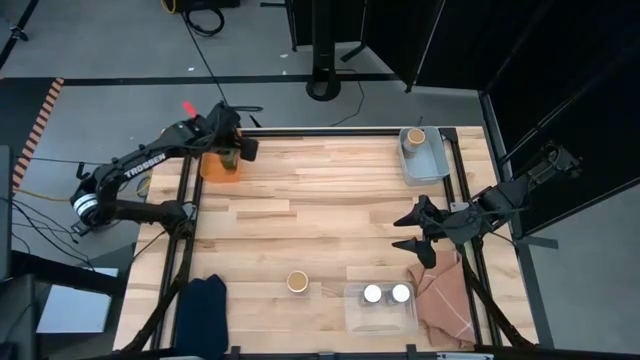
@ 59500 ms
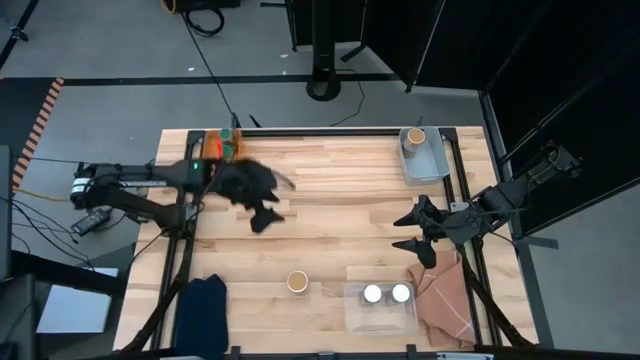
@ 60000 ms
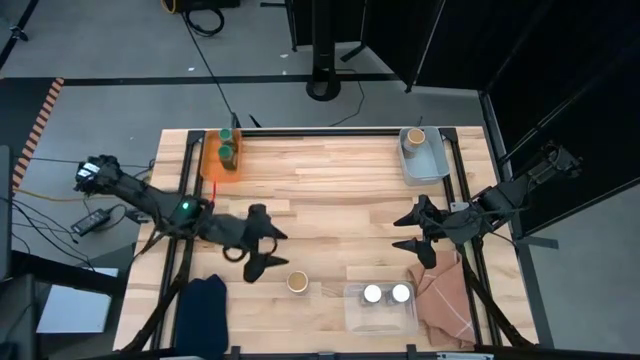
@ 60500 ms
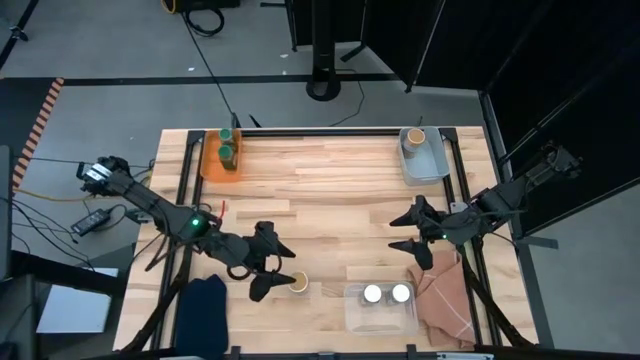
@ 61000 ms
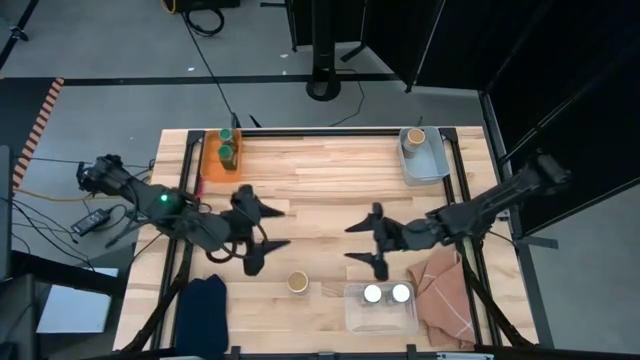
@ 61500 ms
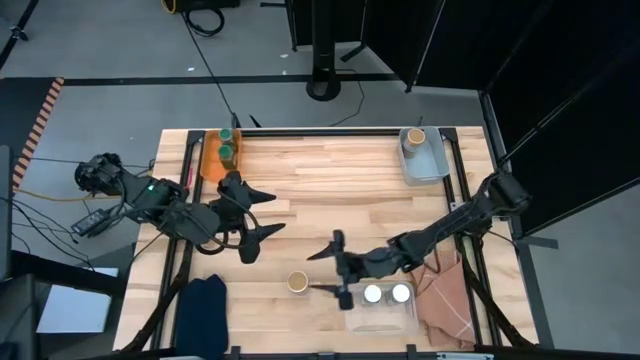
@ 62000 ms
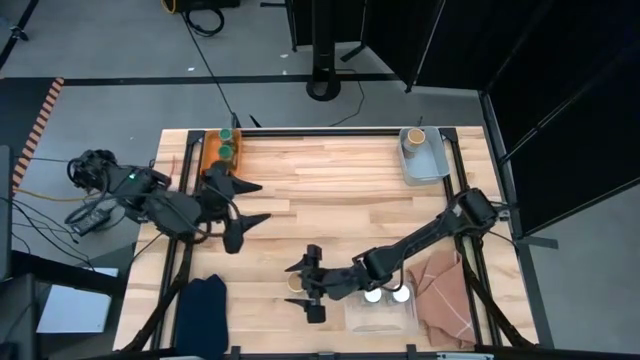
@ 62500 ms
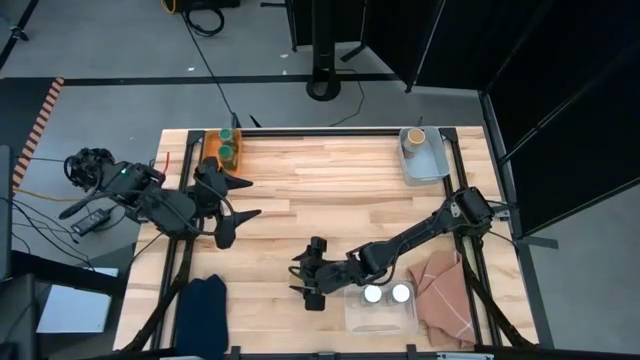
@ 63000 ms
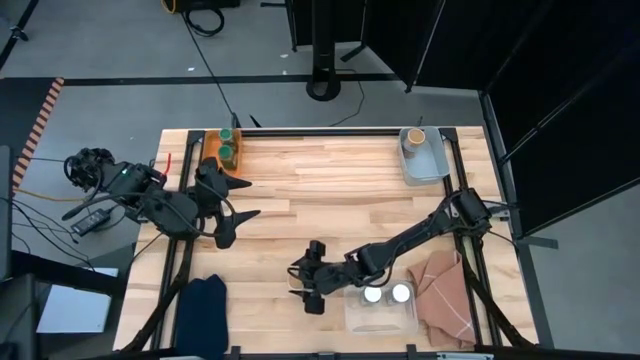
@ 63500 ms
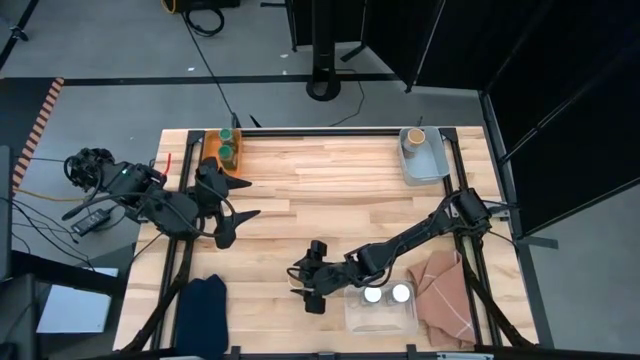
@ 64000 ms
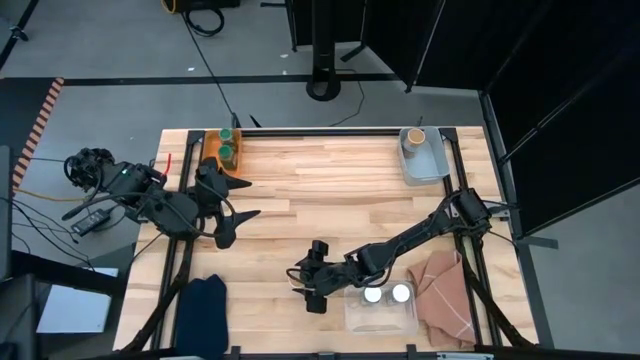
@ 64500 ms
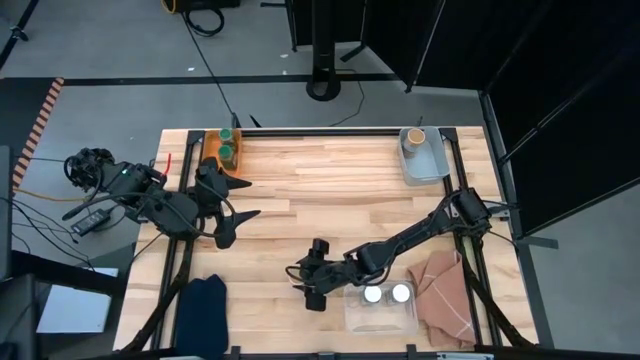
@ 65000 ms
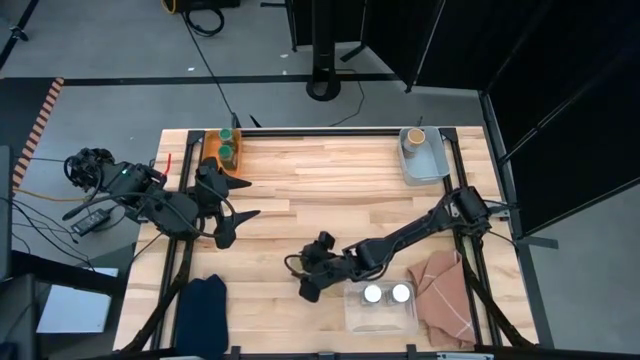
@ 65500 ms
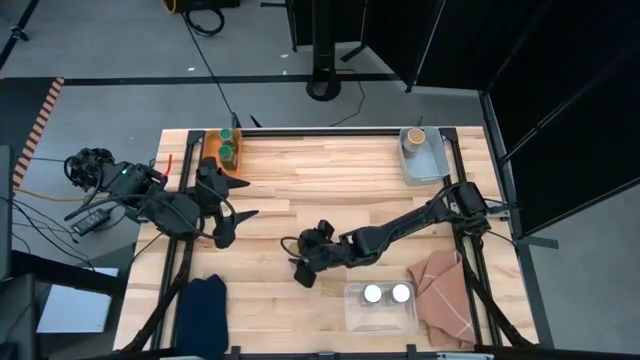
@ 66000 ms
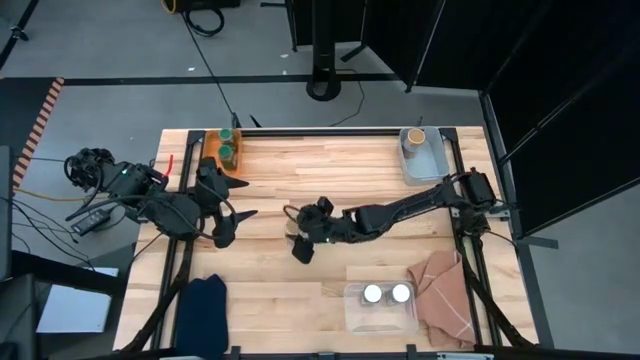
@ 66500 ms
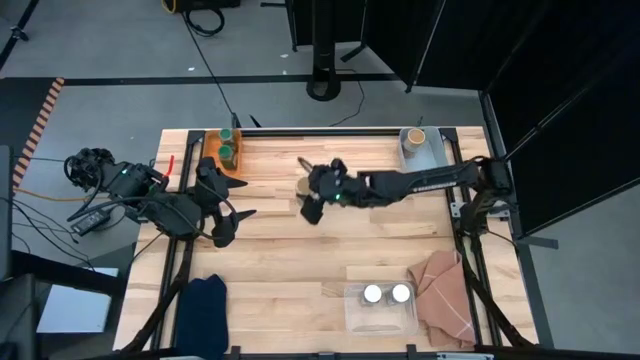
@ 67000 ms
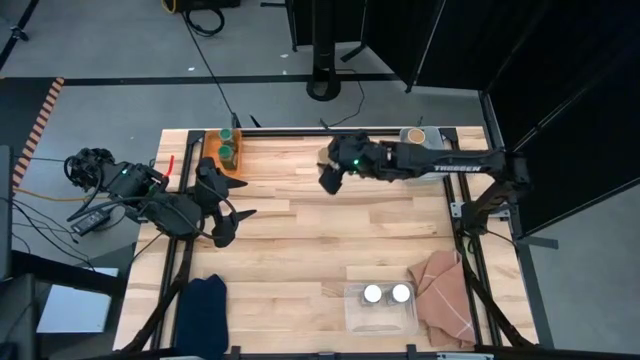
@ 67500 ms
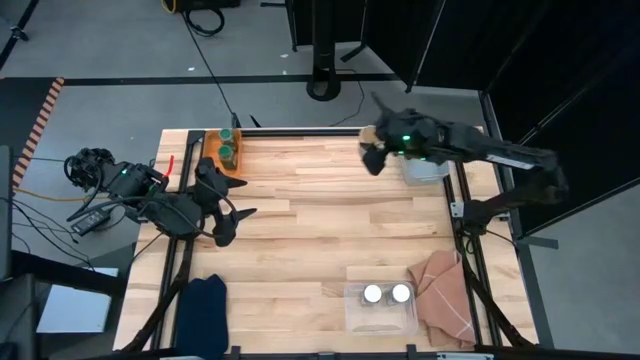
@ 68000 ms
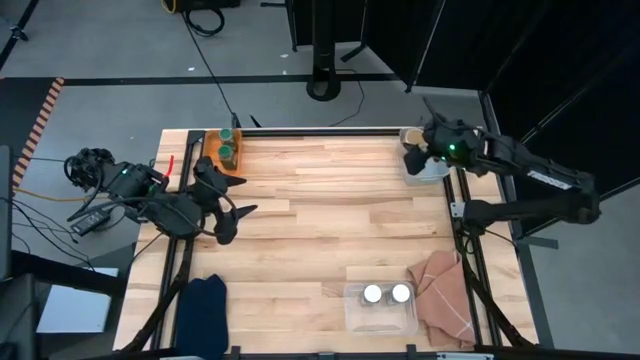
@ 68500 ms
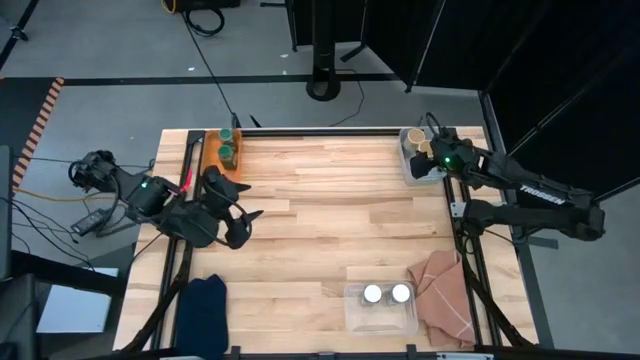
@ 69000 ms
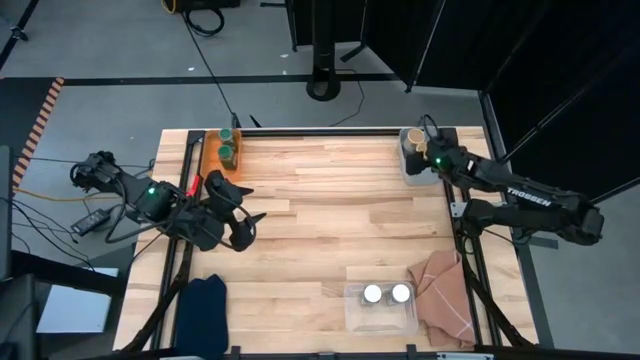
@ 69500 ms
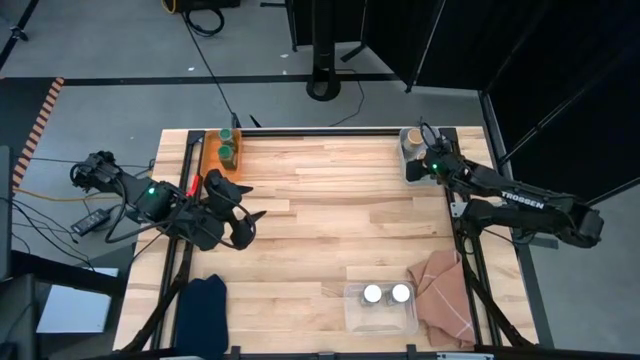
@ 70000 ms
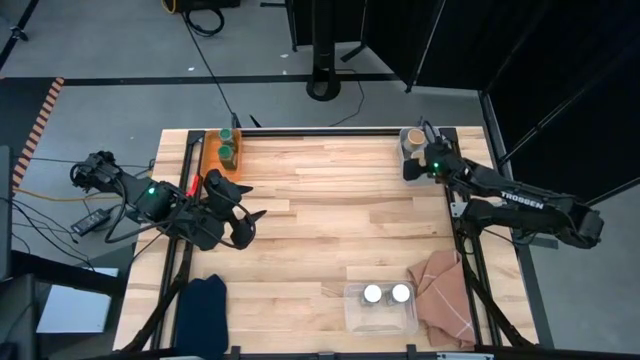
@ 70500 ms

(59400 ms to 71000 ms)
Task: Sort spices by type
Put the gold seasoning bottle into the gray bin

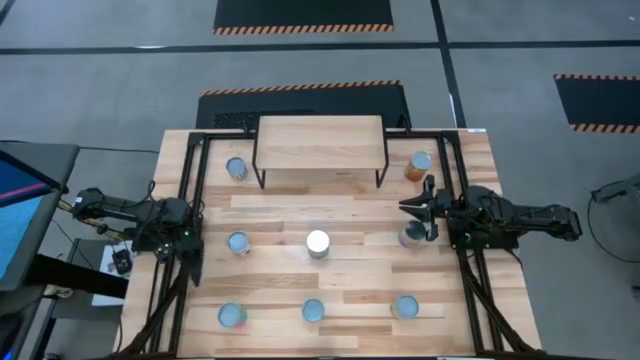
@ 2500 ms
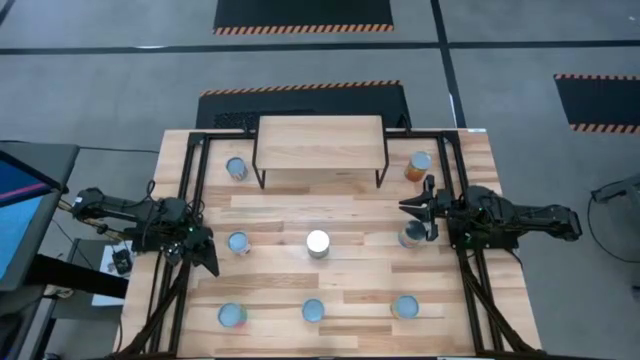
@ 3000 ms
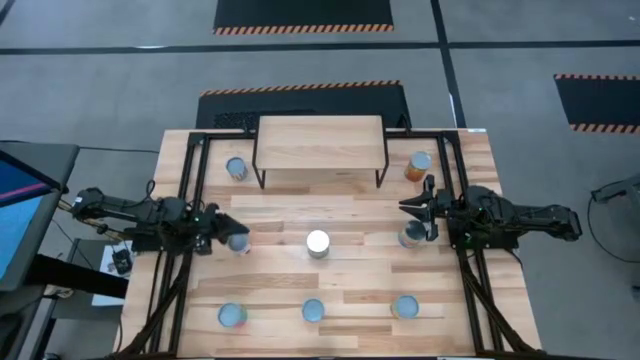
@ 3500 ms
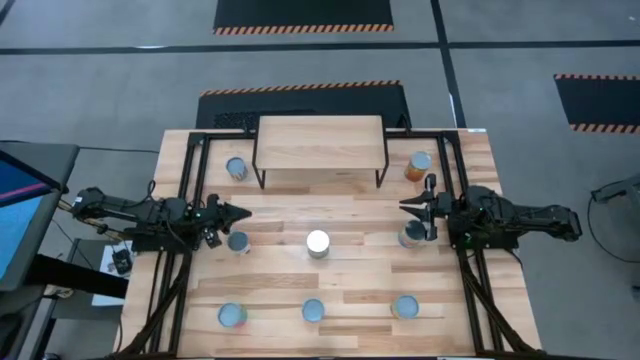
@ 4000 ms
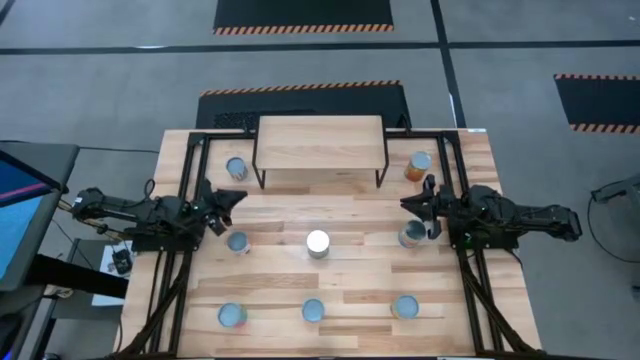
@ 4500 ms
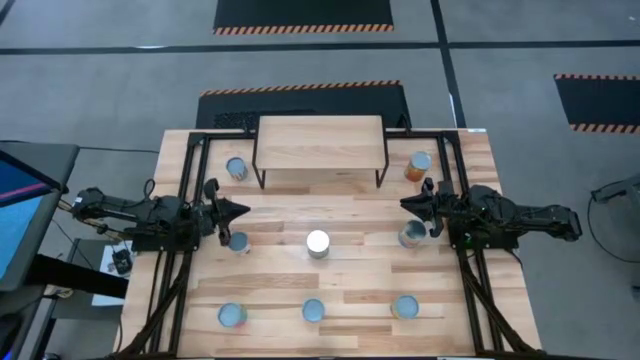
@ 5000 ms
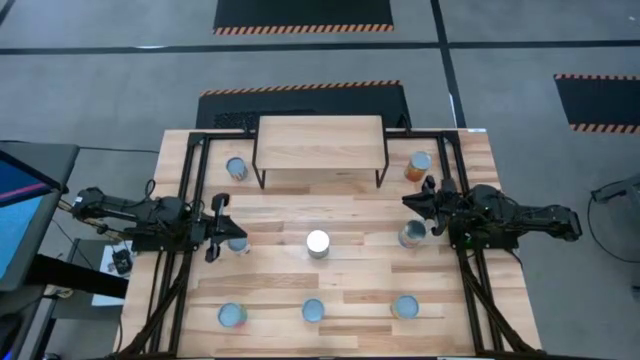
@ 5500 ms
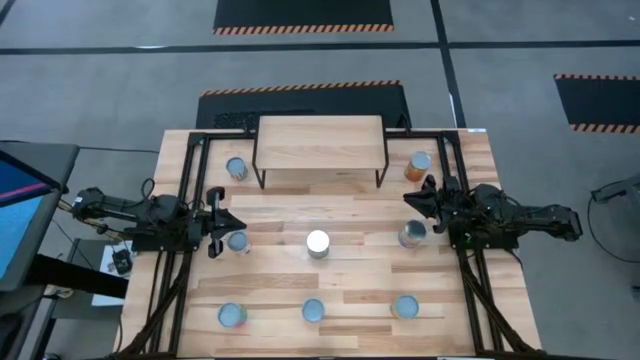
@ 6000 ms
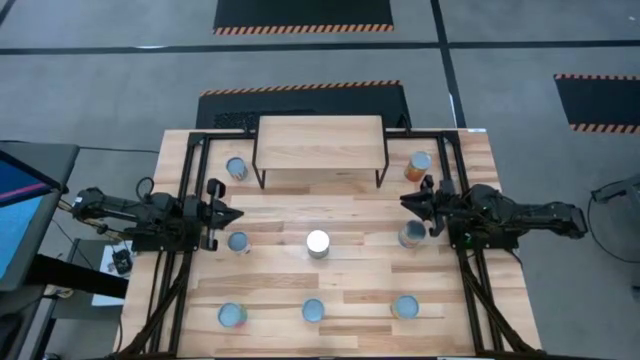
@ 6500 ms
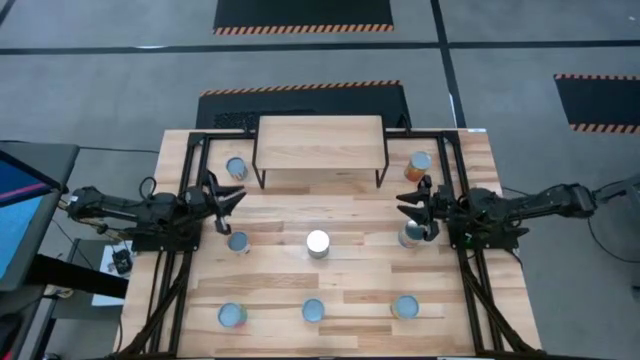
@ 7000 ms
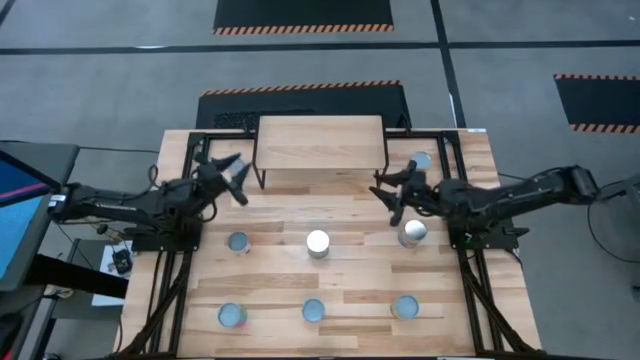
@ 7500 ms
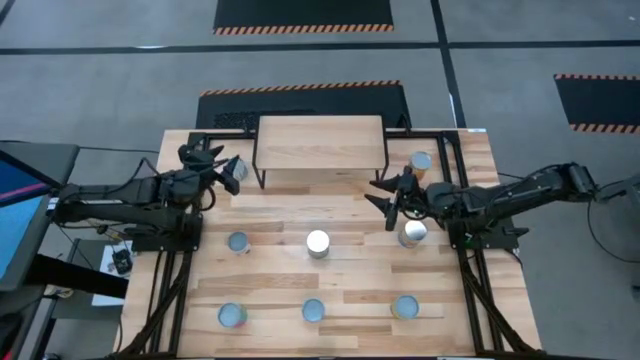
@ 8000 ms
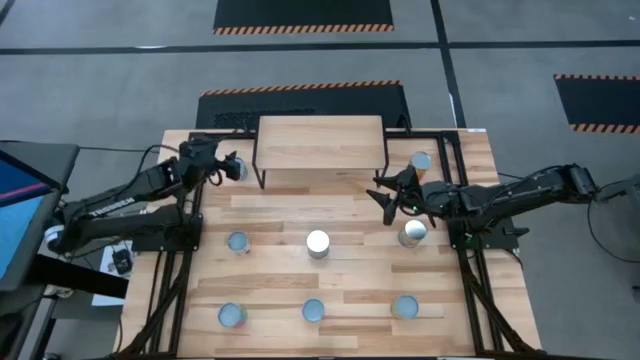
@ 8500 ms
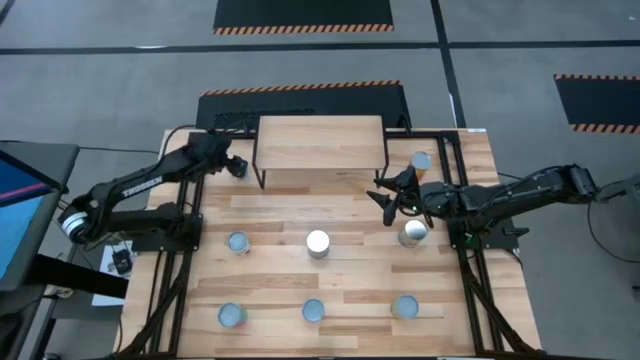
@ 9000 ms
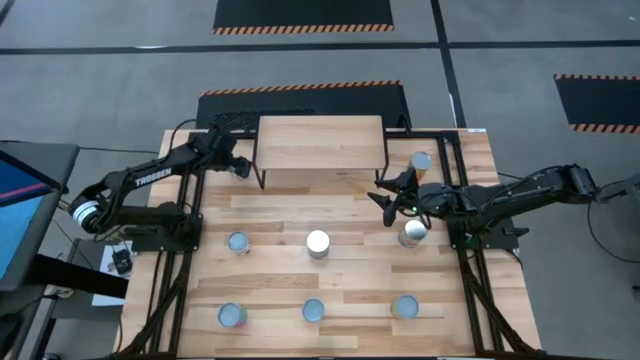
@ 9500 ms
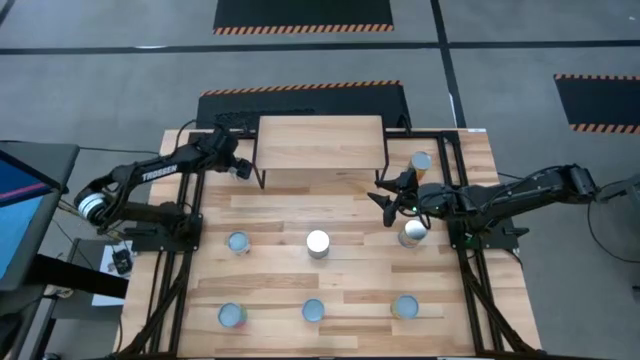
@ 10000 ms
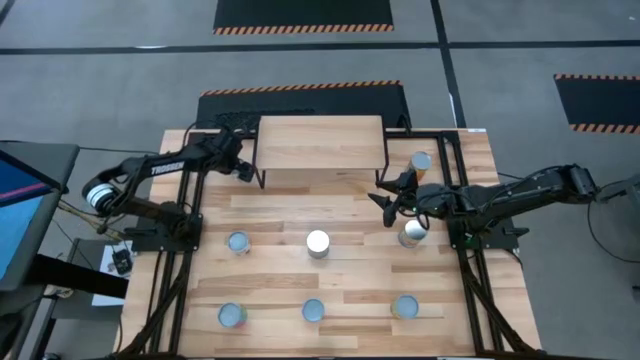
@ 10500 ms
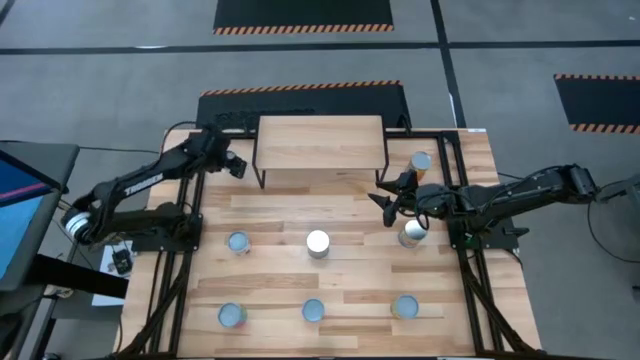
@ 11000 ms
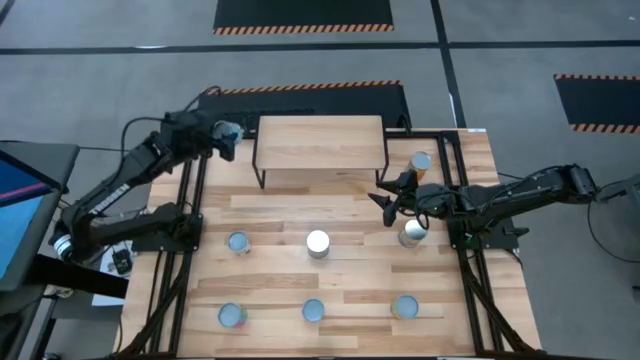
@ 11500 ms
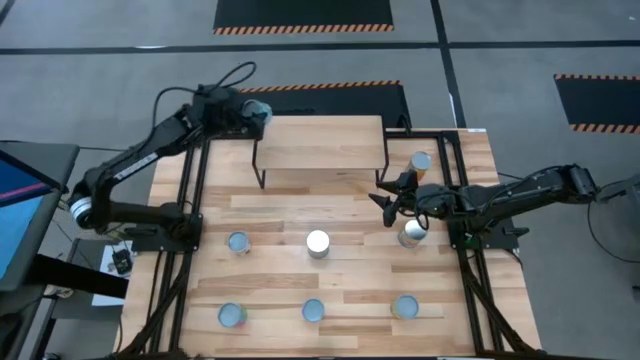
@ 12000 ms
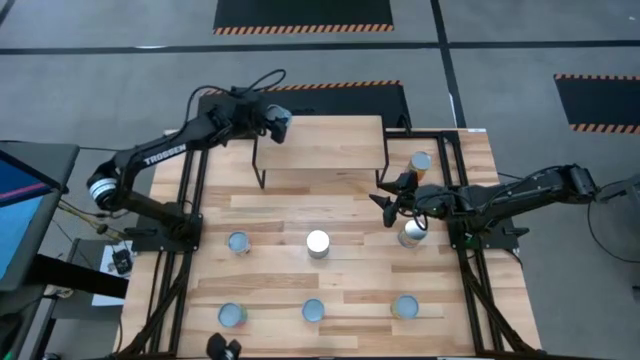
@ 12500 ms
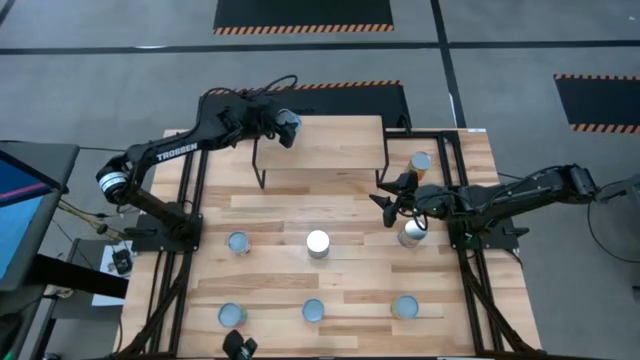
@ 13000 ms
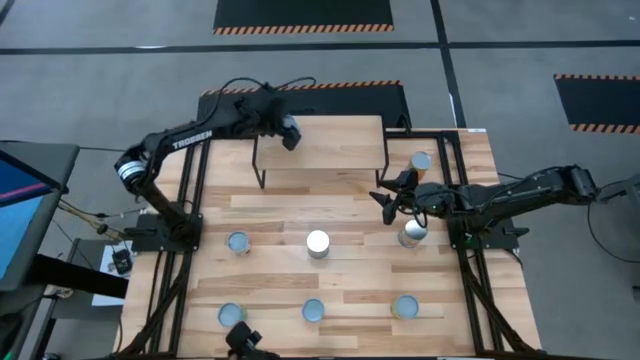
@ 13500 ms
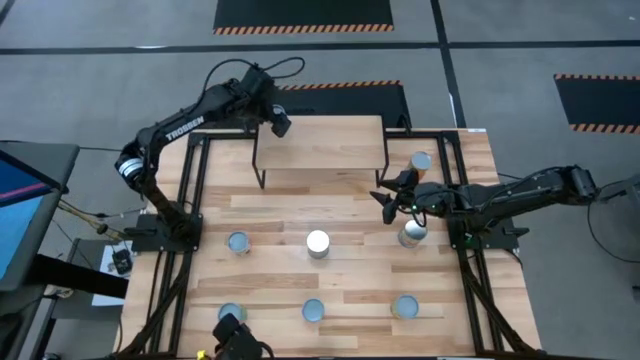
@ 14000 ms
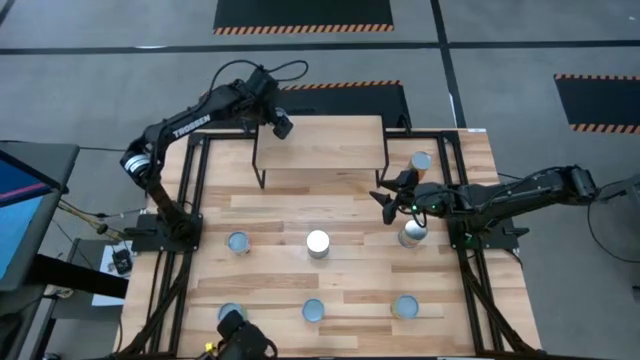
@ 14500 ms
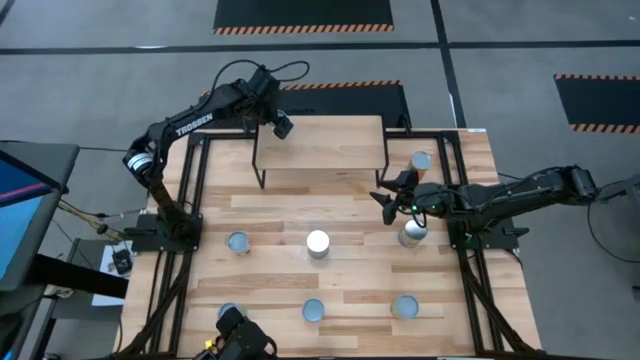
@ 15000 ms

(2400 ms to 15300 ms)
Task: Pick and place cans onto a shelf
Put the canned carrots on the shelf
